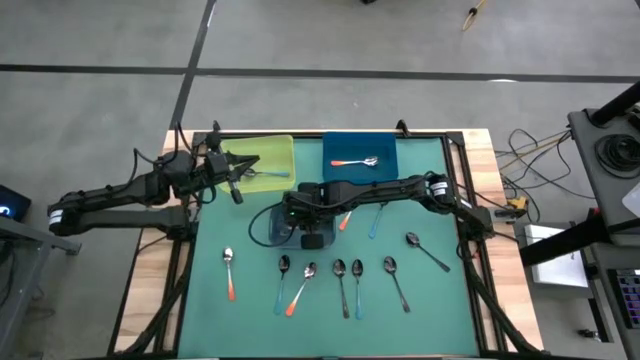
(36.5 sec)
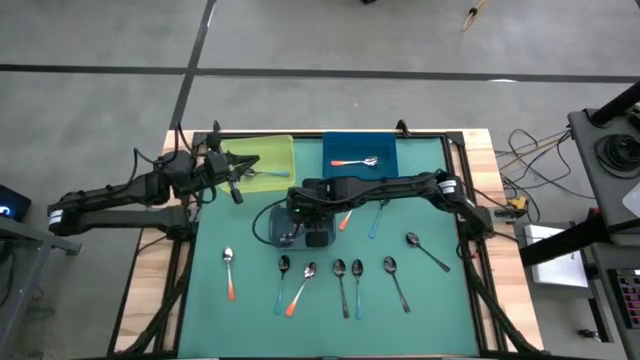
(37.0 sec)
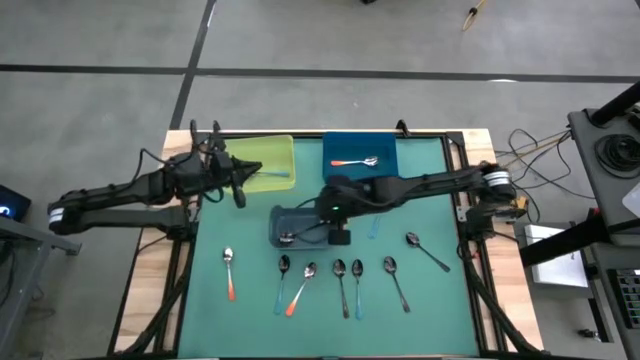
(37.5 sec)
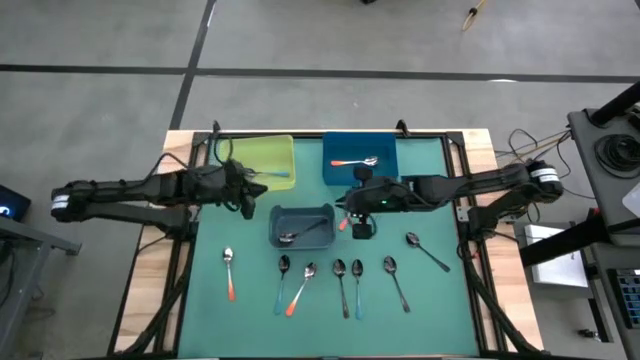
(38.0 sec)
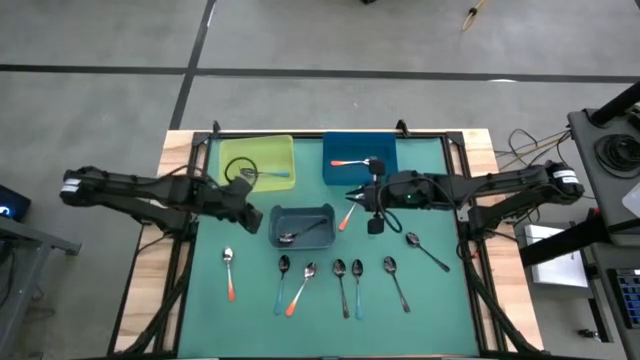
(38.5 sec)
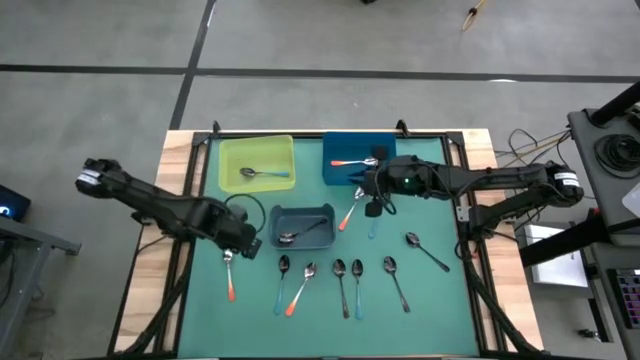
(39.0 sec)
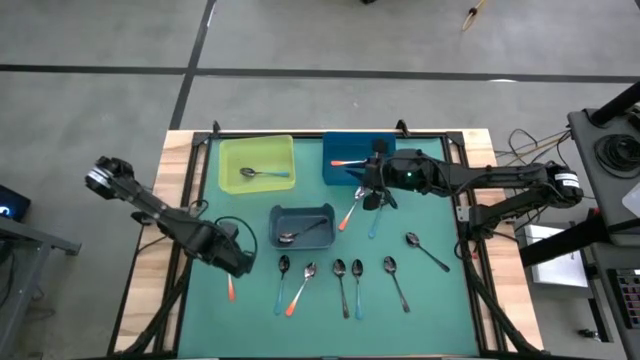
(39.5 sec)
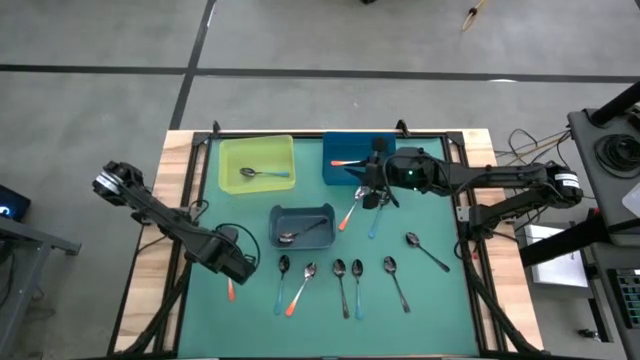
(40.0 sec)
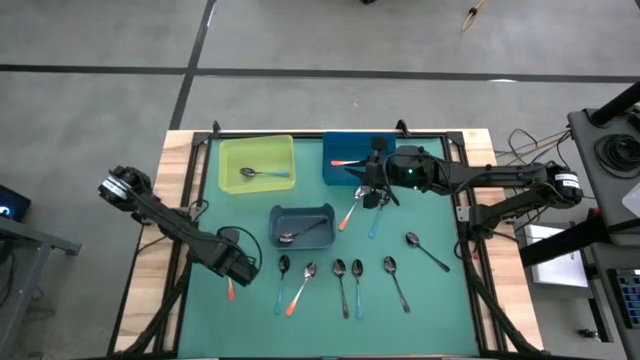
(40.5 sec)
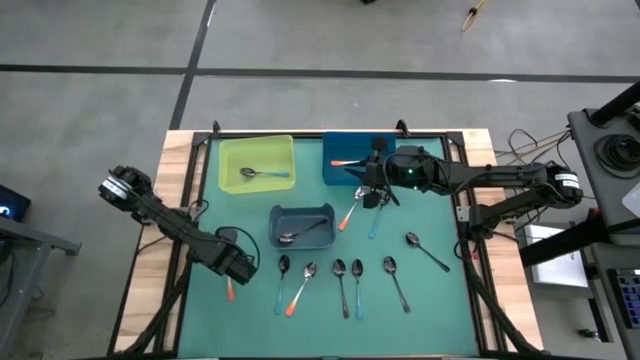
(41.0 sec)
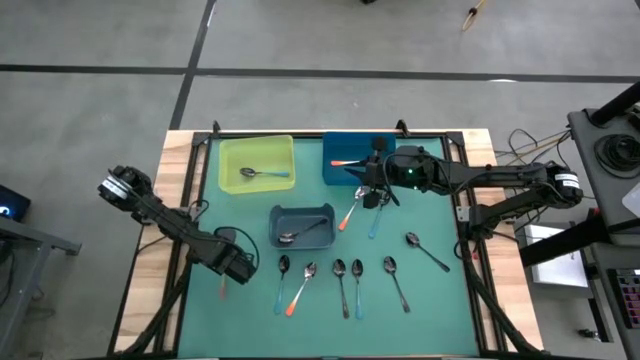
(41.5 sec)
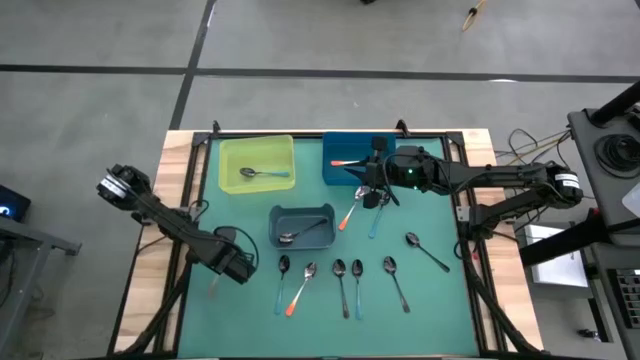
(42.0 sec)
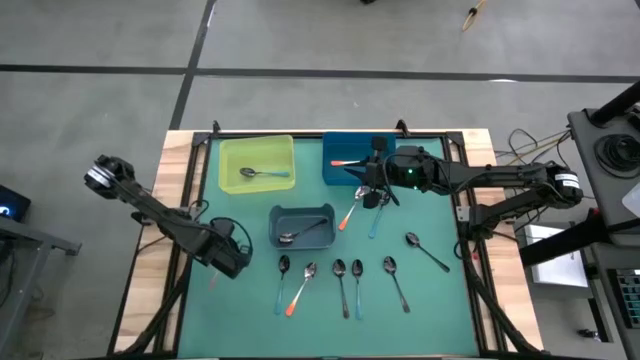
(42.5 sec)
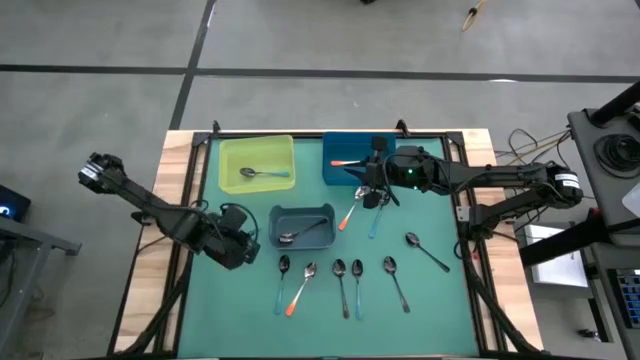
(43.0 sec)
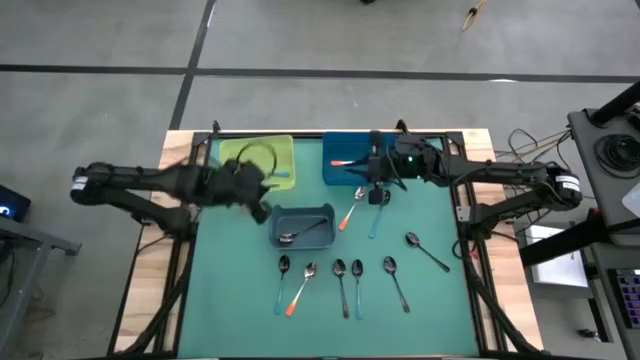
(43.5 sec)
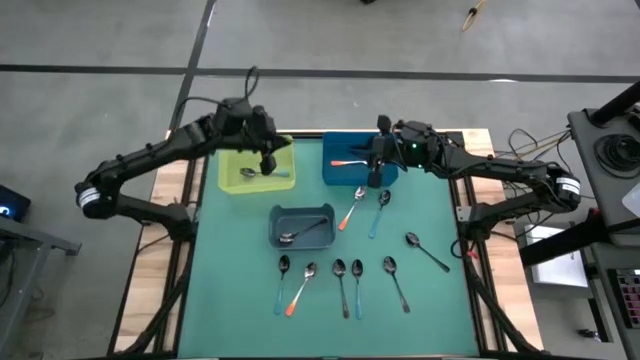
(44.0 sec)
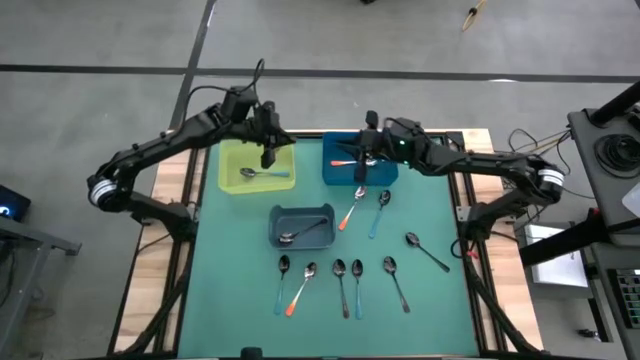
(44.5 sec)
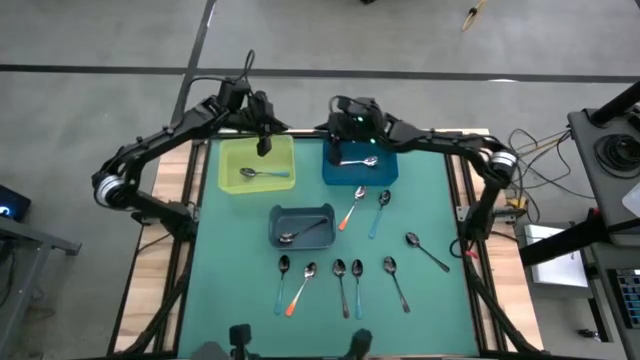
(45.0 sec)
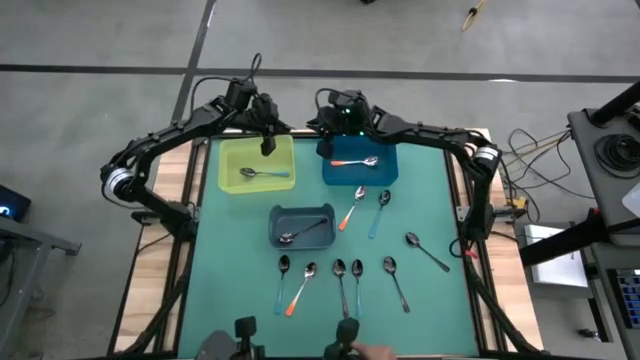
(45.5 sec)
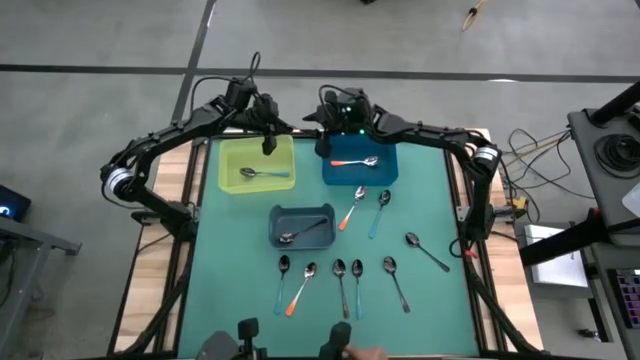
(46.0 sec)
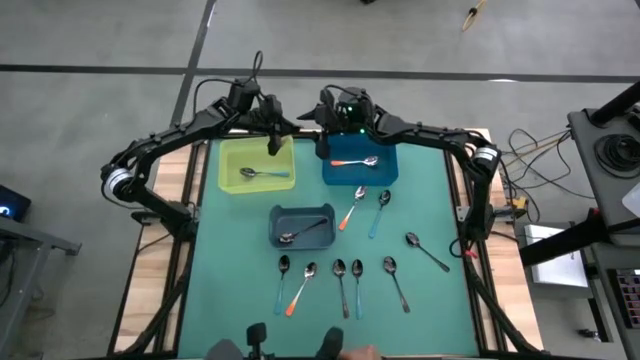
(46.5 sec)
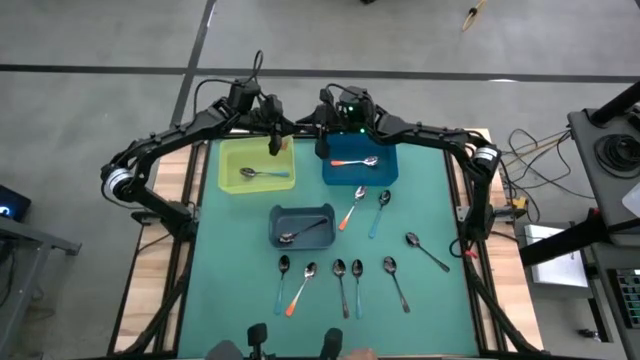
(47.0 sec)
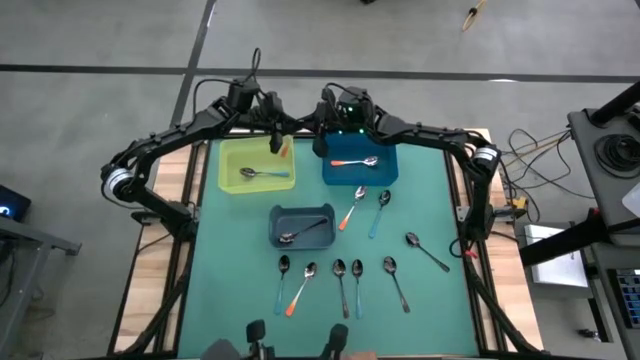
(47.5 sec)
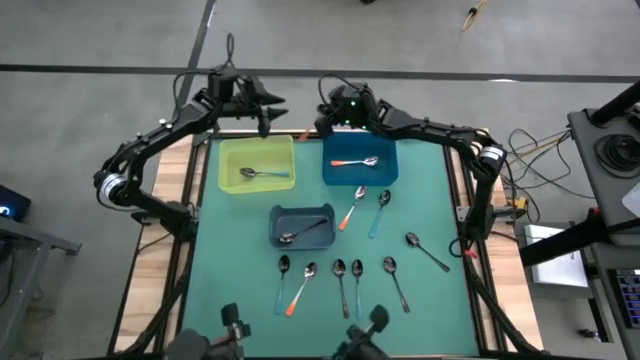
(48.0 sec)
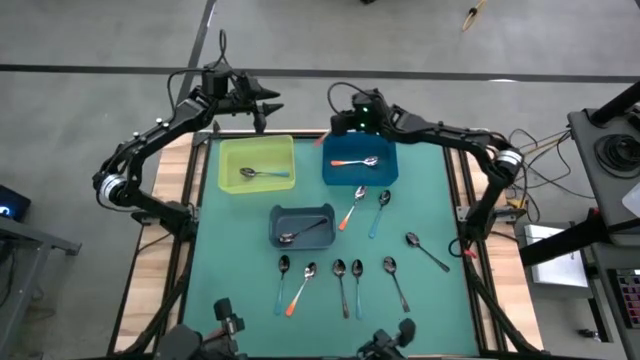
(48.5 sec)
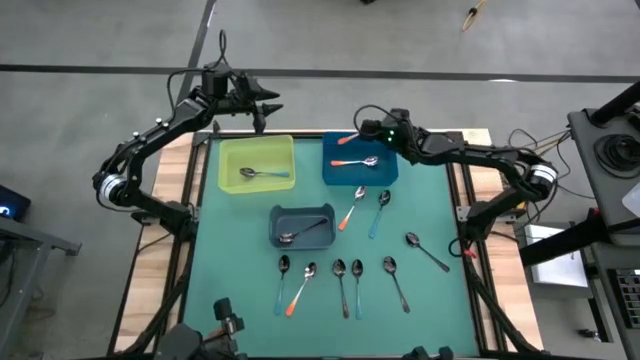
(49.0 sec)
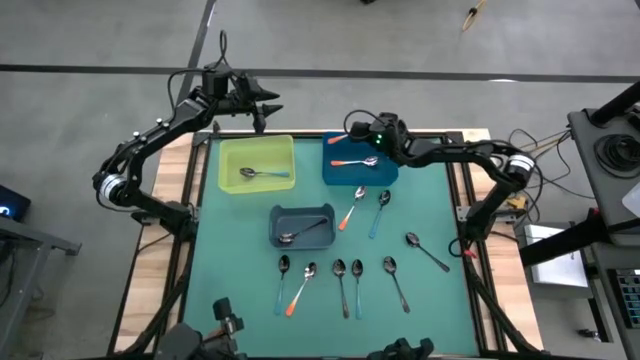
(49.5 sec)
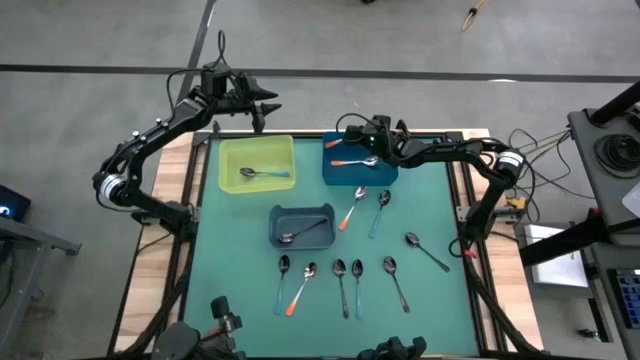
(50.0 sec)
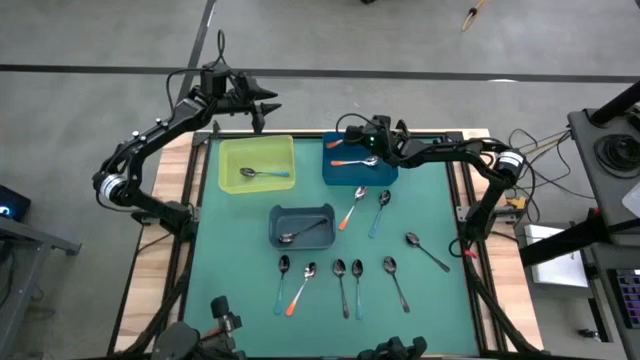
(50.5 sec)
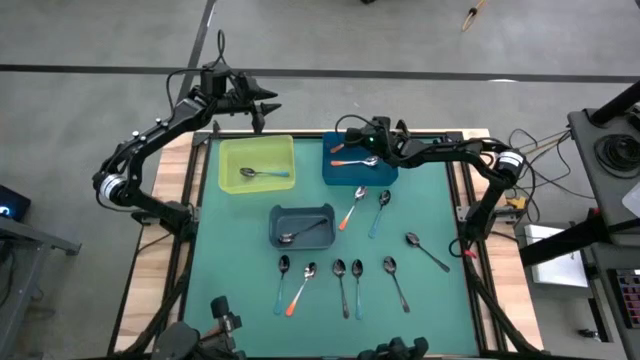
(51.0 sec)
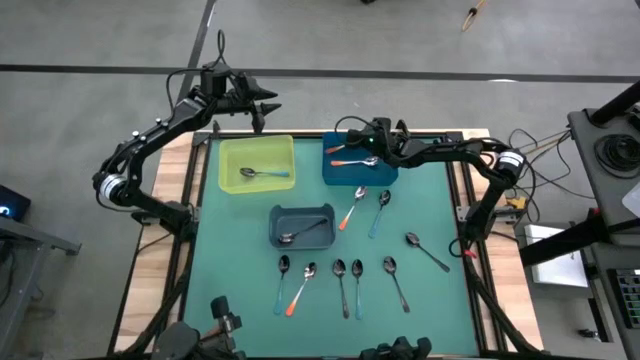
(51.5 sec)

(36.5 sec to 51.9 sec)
Task: Sort silverware by color (type)
Put the orange spoon into the blue bin

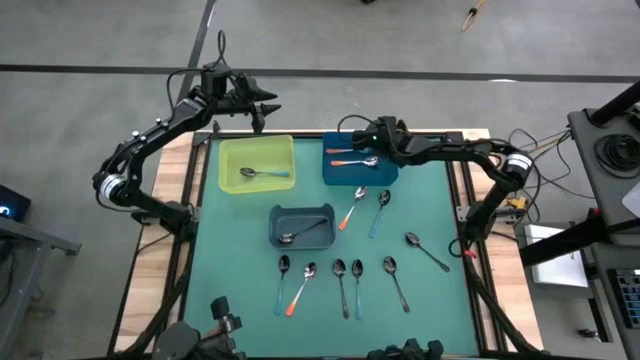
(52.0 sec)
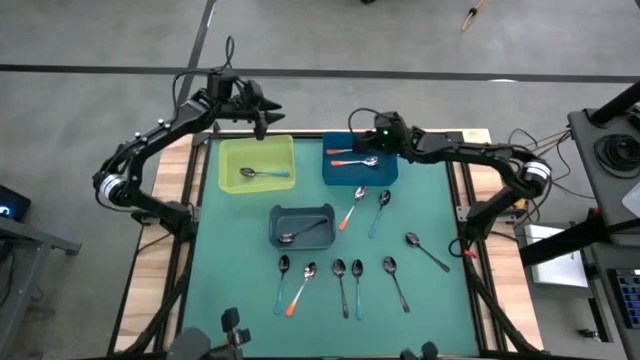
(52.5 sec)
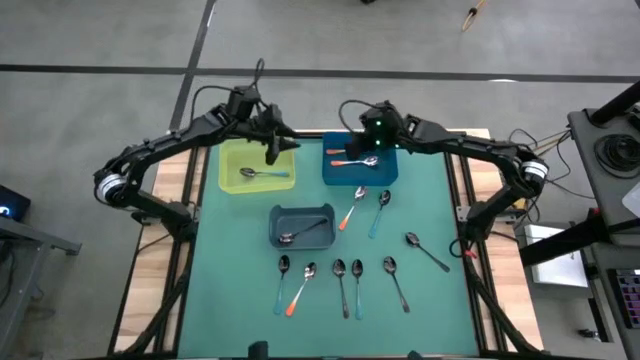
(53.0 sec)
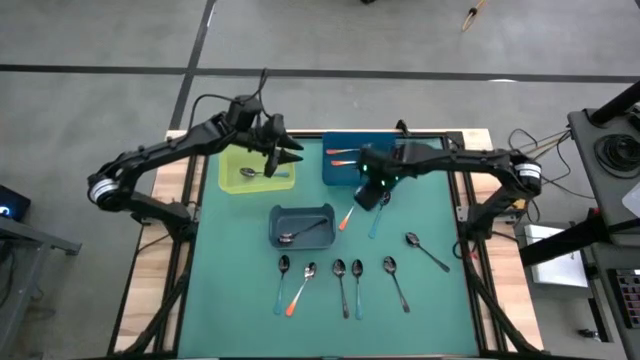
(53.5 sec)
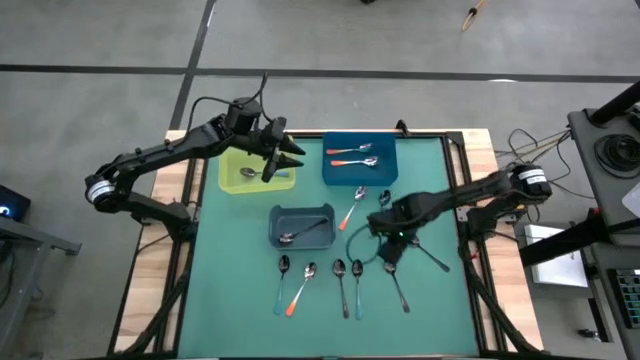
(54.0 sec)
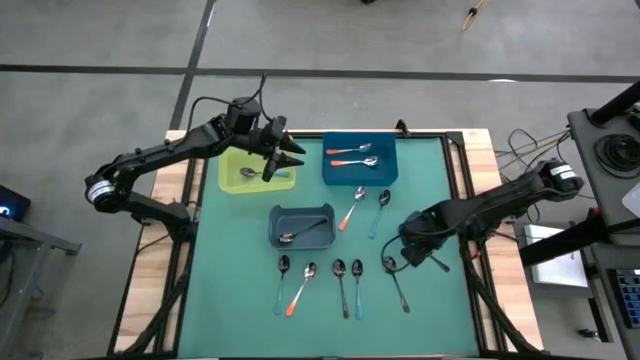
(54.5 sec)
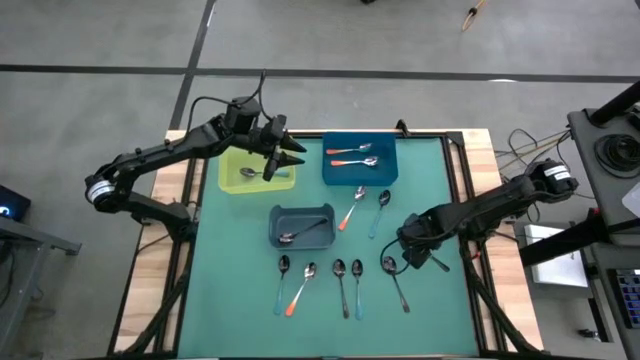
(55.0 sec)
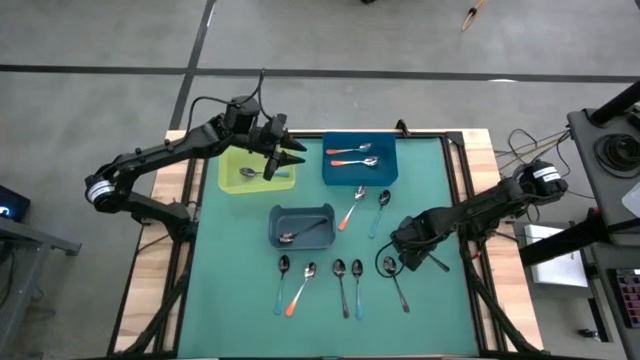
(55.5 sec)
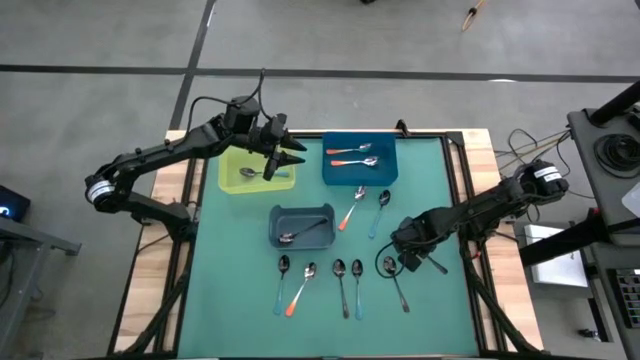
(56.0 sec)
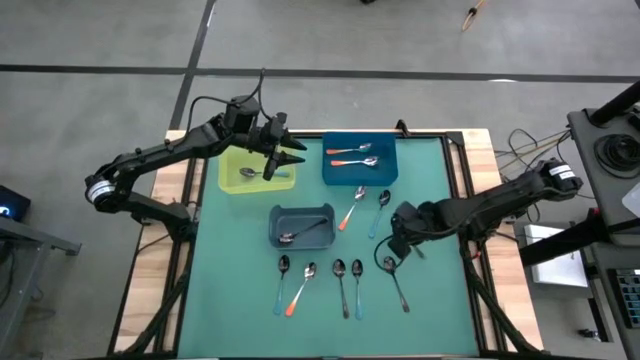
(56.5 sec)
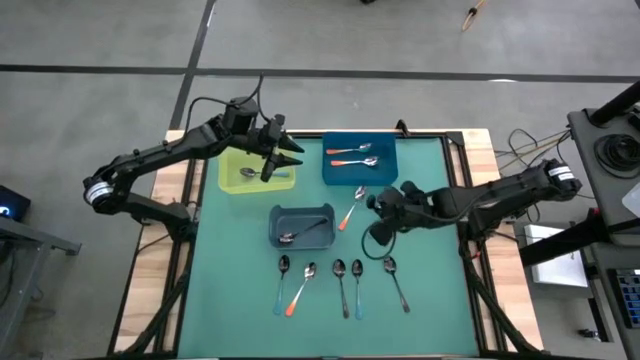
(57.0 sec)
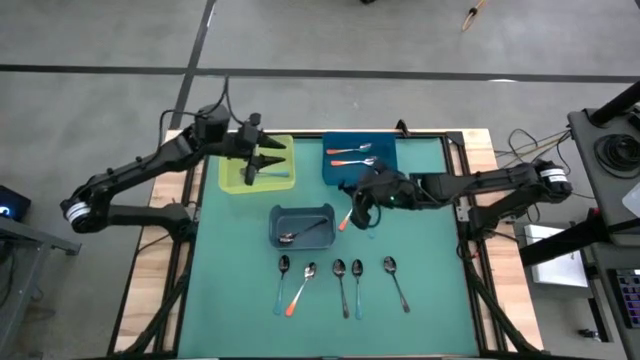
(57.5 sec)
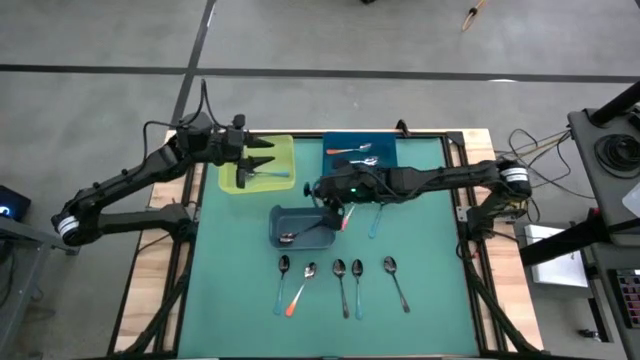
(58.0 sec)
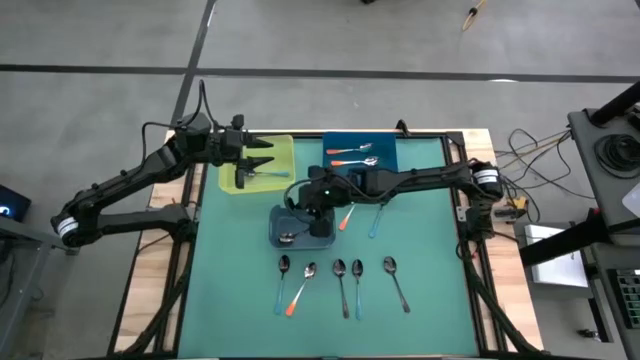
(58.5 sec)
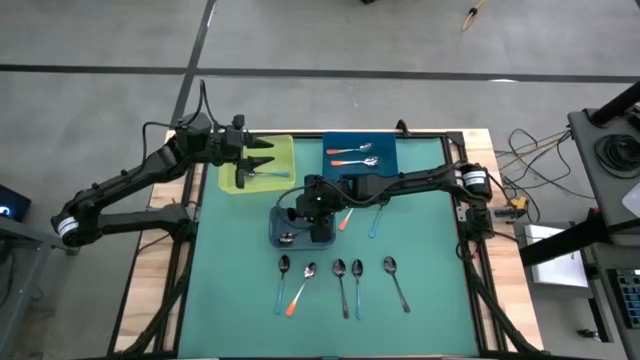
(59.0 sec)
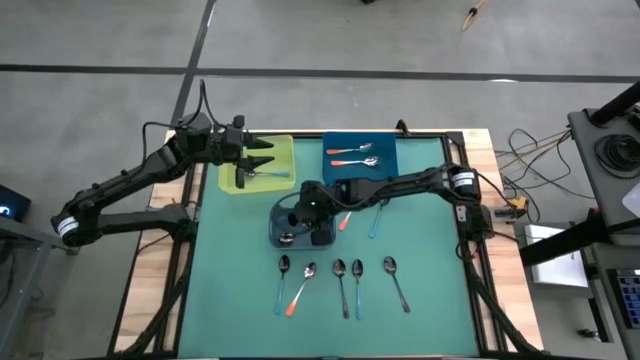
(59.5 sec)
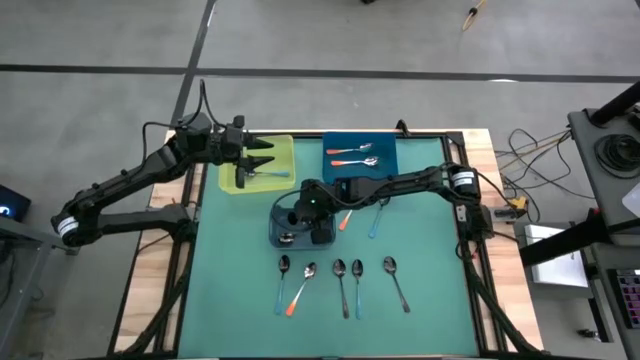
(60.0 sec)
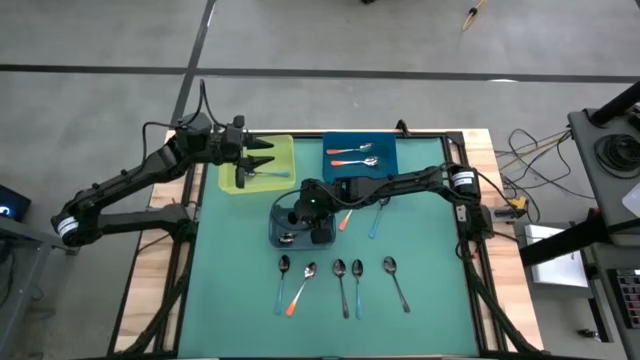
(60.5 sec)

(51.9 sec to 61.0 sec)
Put the black spoon into the gray bin
